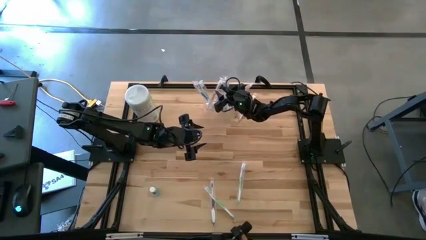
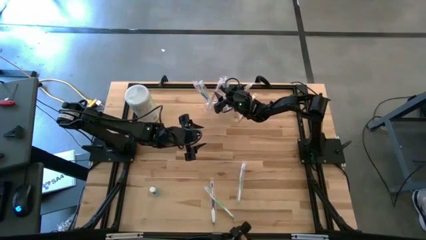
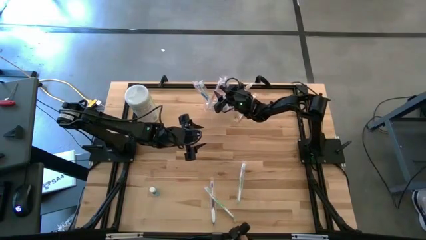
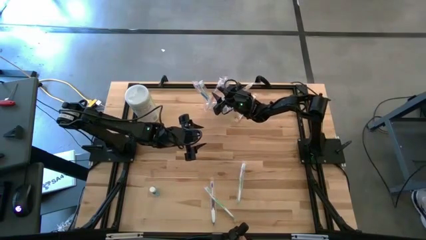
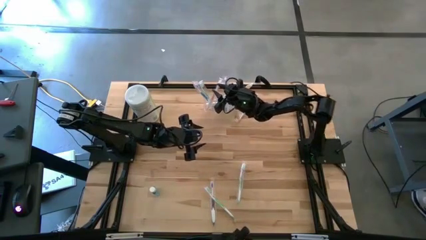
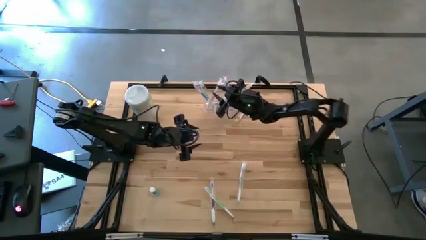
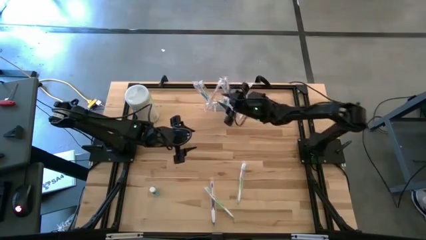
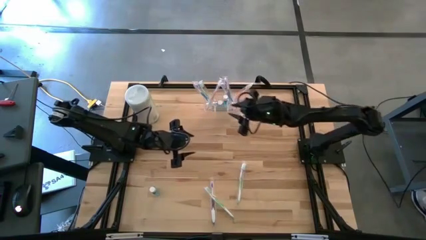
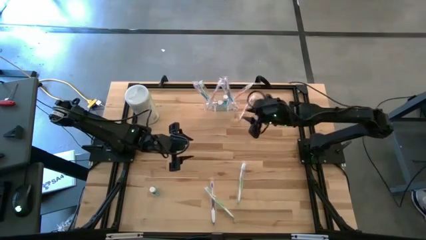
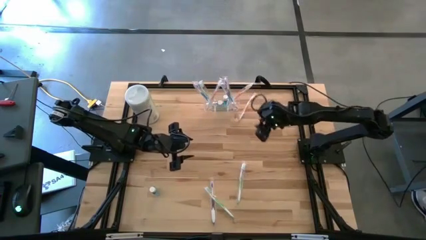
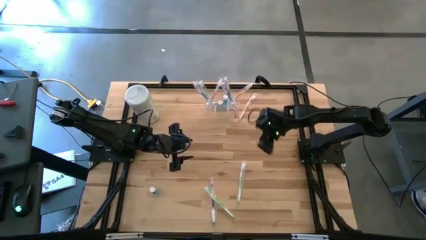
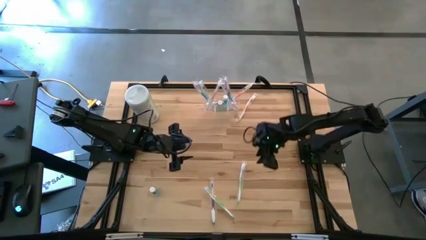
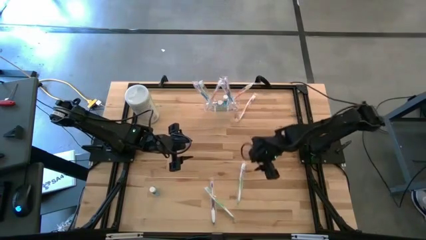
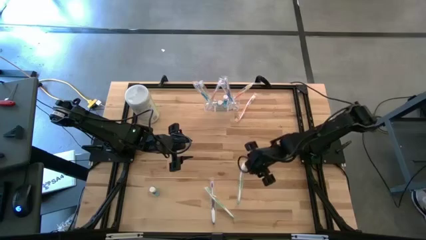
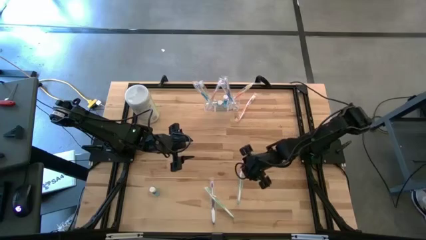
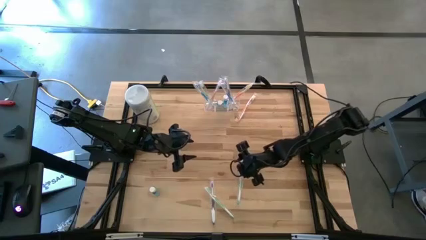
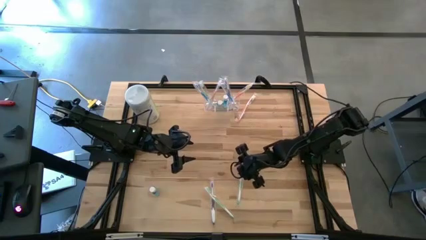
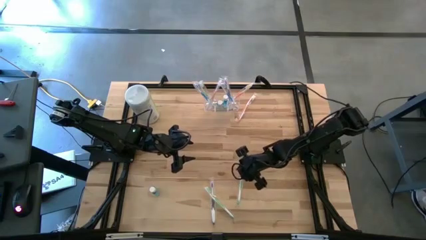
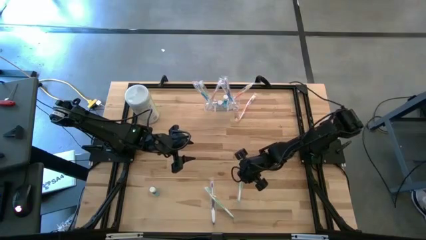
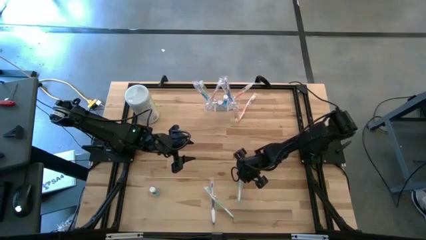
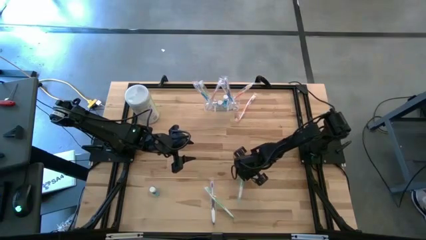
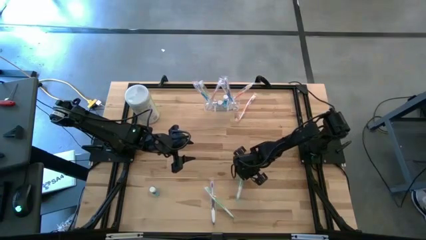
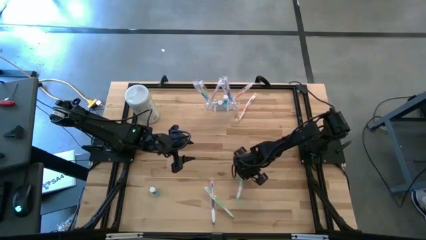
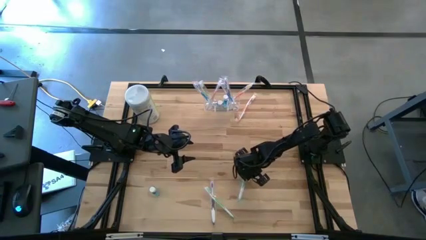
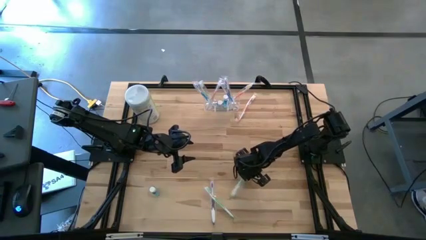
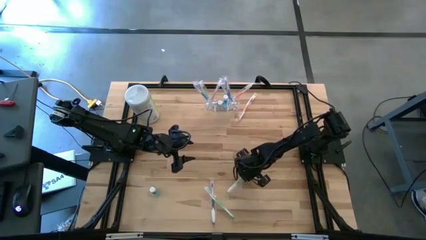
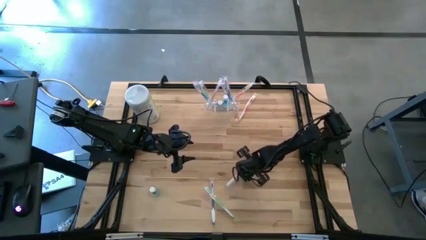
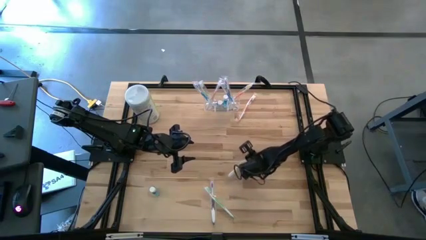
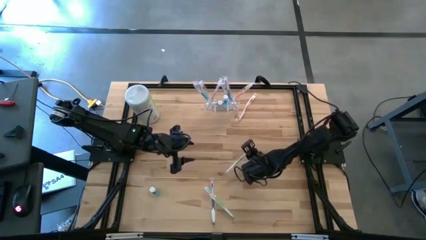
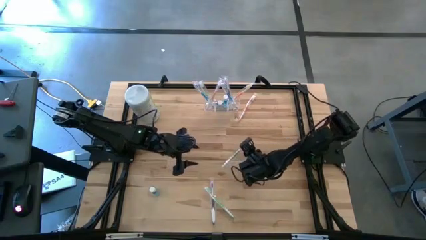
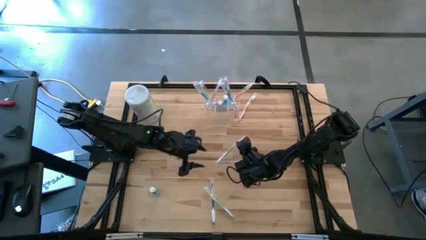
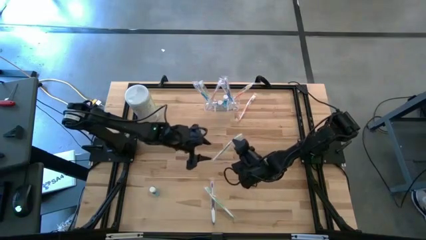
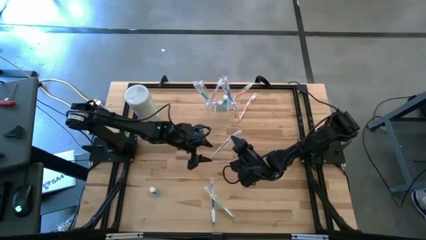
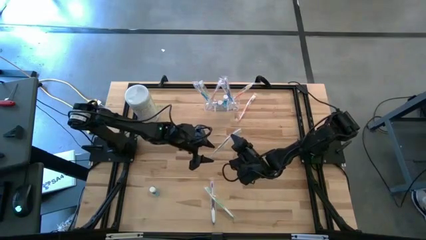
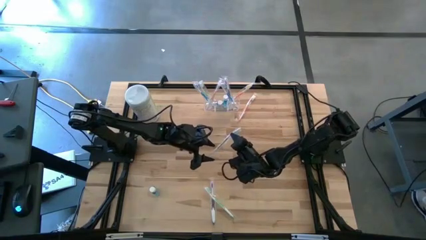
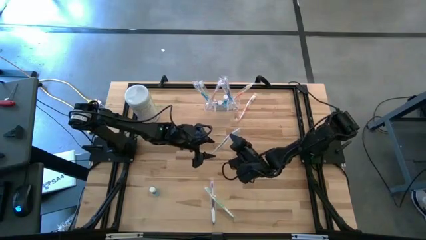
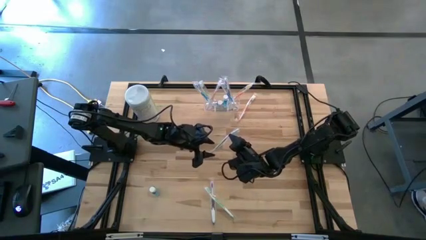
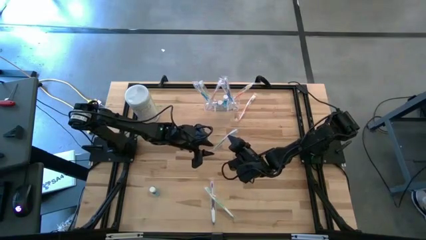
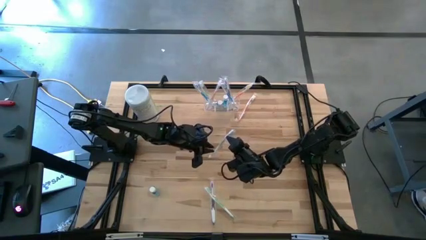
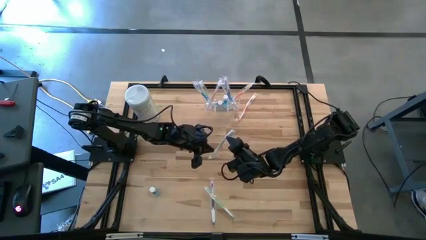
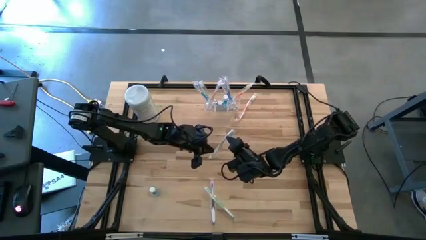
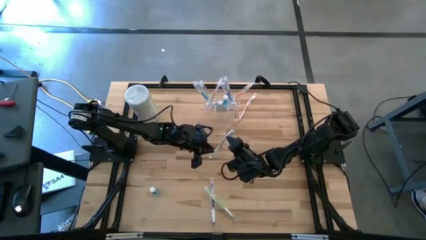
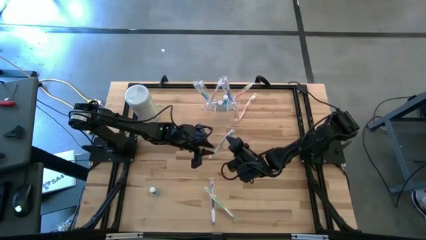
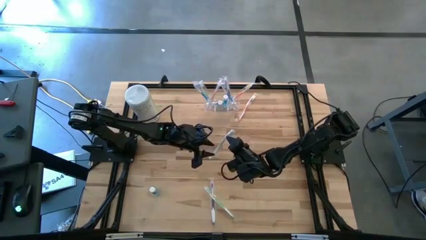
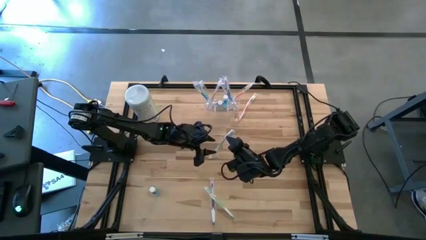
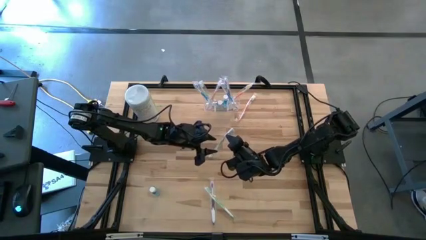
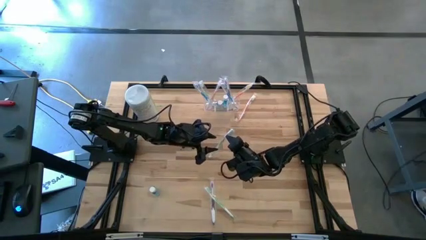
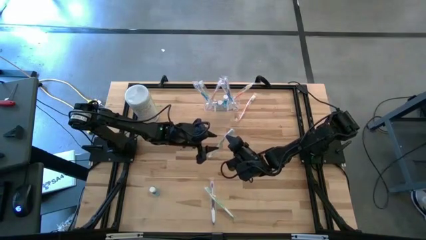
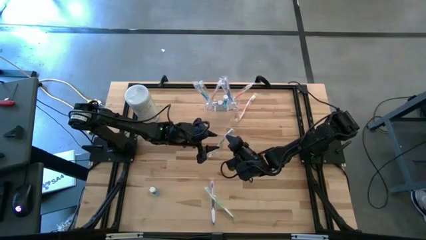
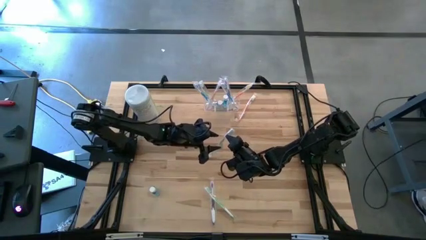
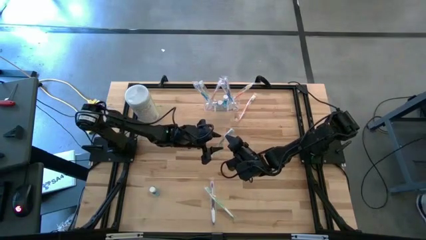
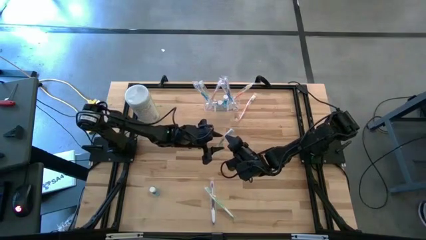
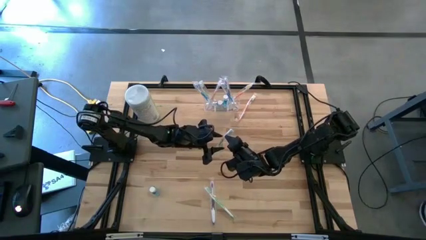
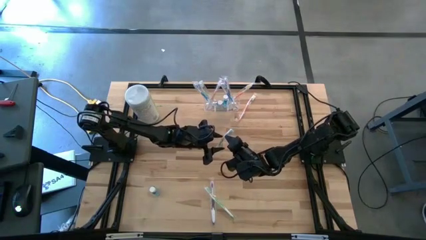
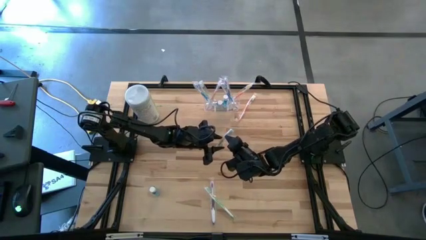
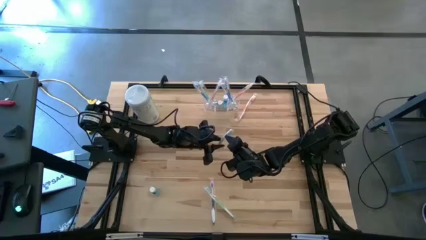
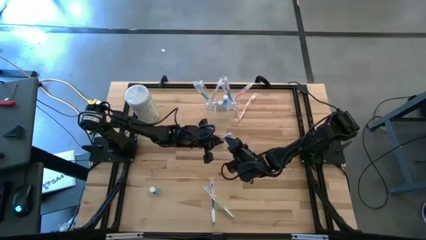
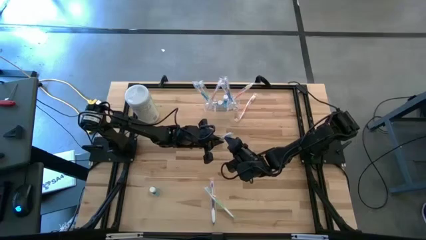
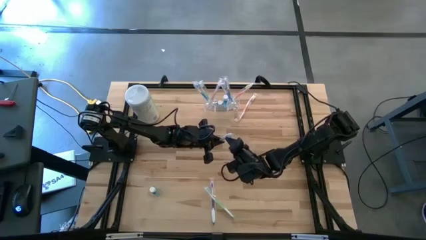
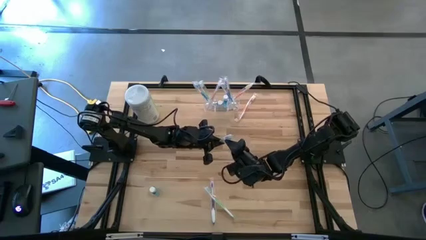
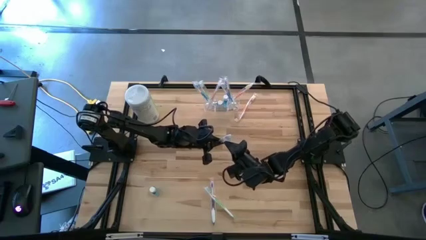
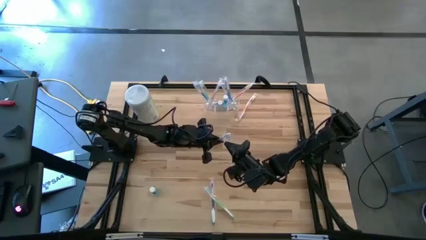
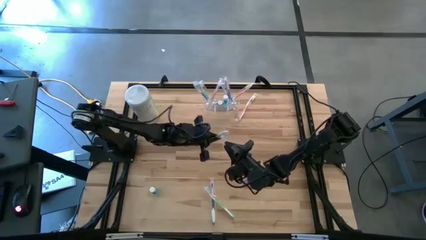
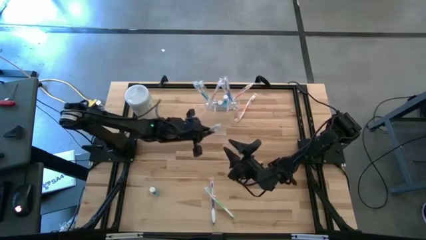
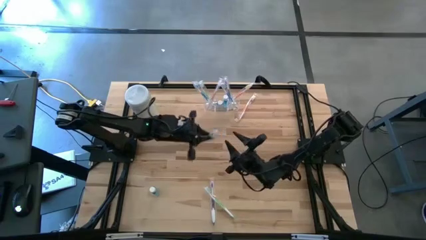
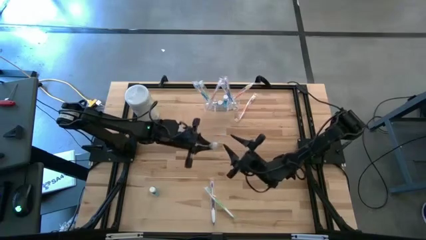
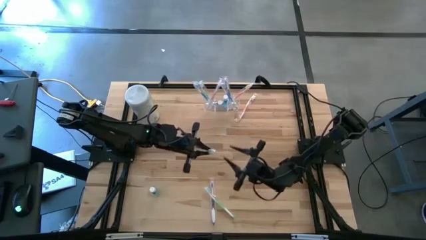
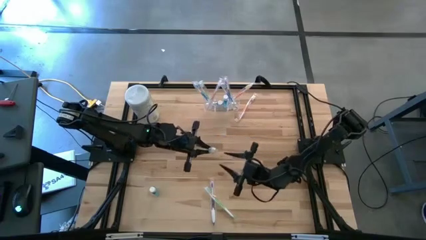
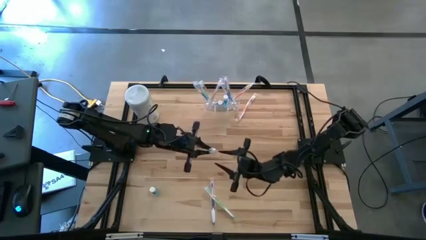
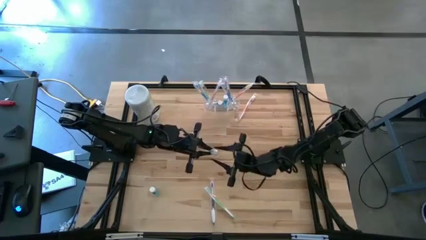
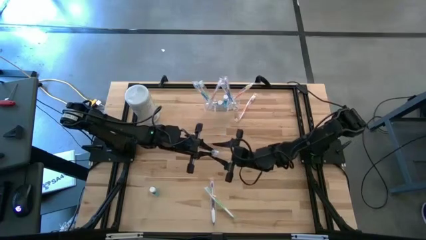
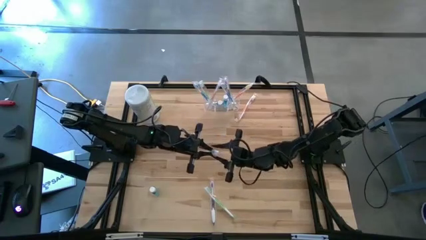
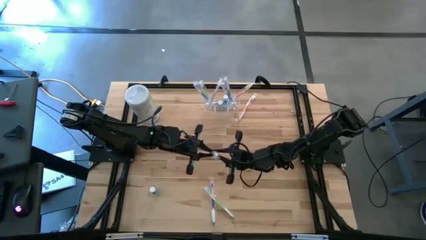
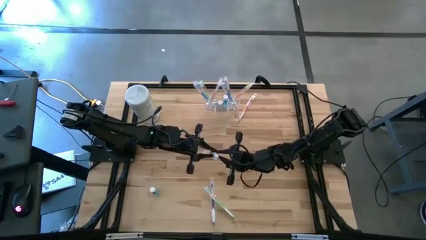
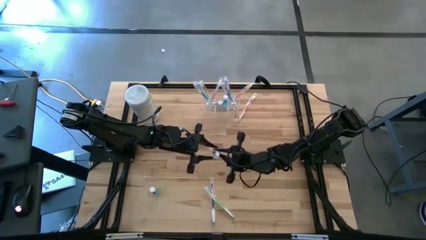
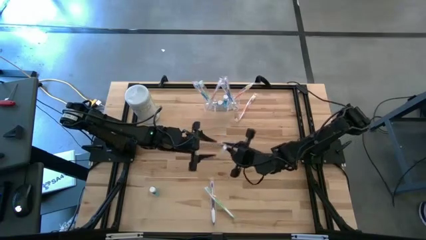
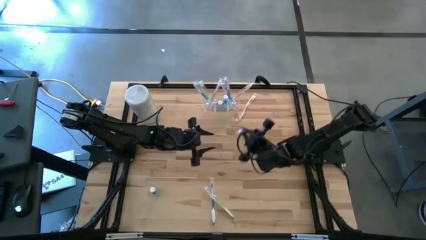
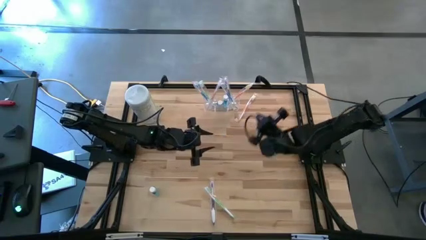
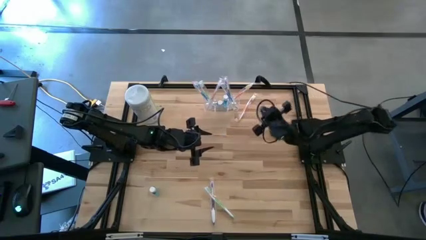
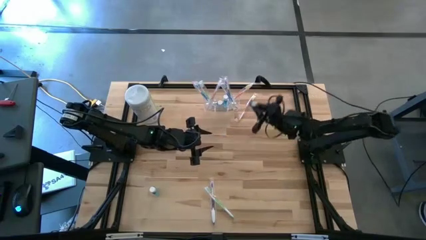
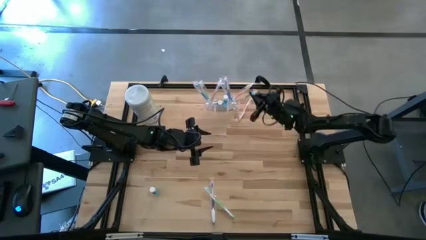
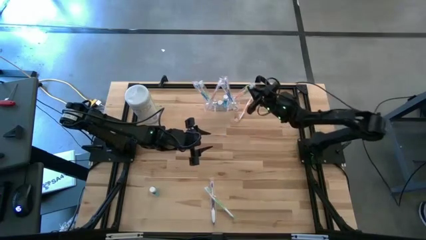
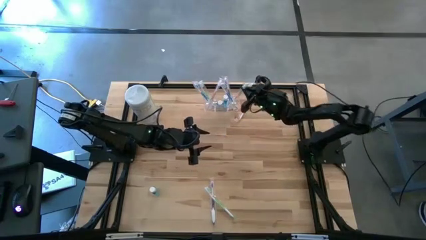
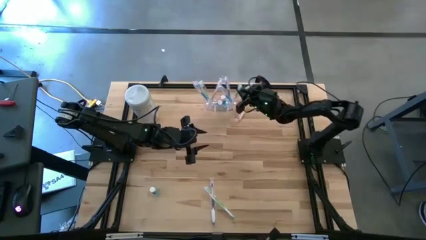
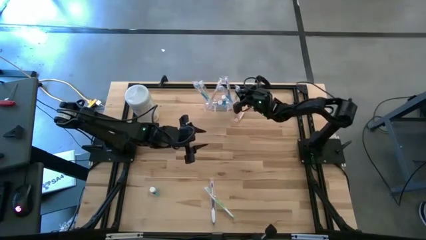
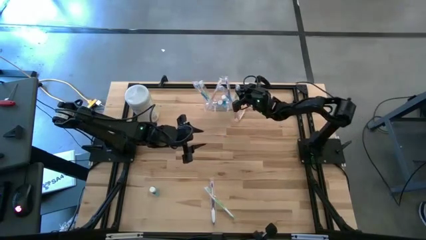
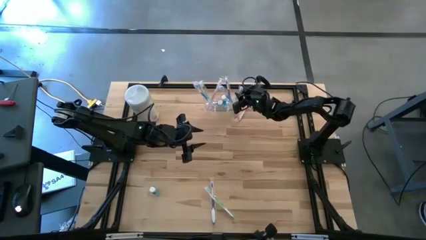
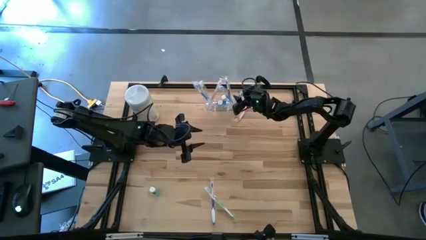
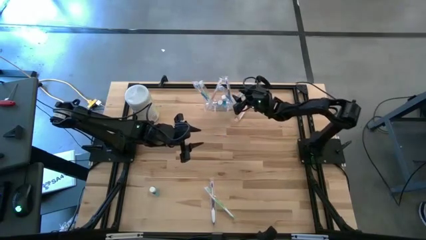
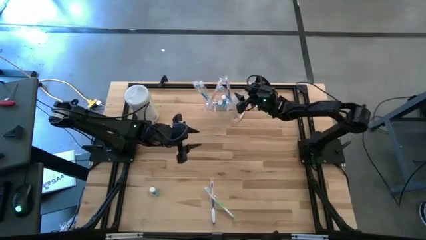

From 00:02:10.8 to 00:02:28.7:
Task: Pick & Place toothbrushing station
Put the right green toothbrush into the transparent organizer
